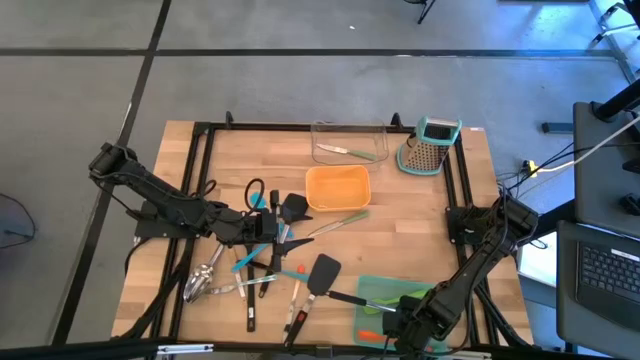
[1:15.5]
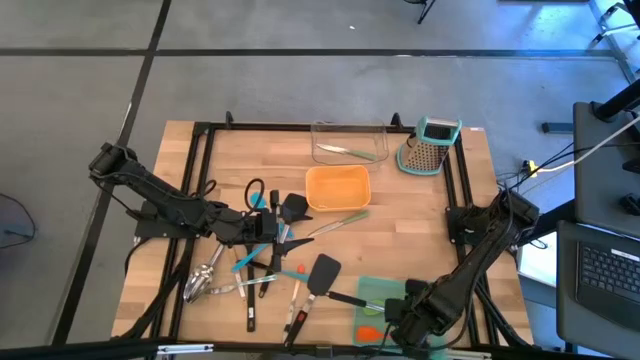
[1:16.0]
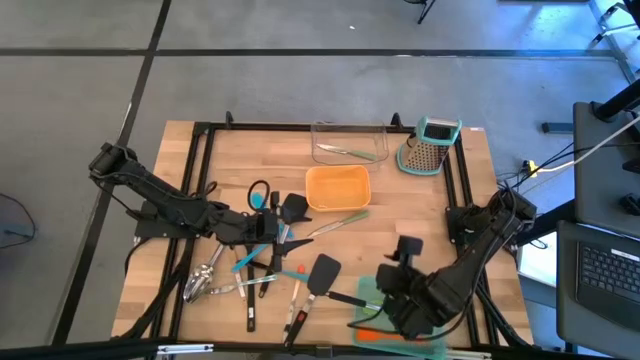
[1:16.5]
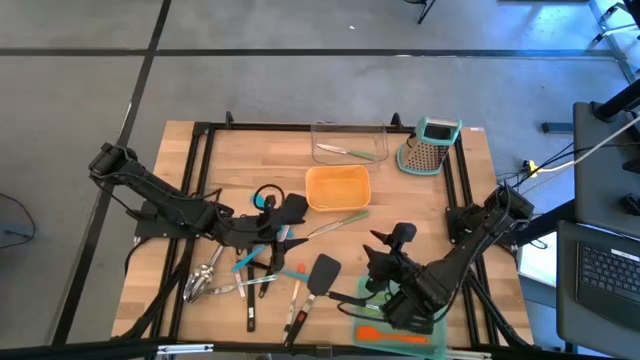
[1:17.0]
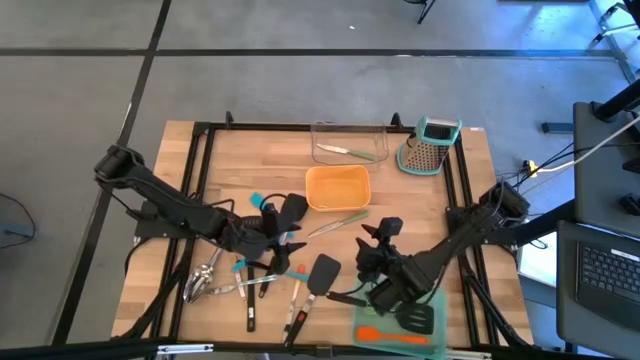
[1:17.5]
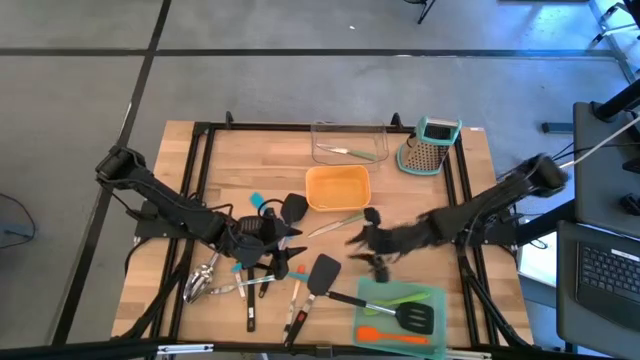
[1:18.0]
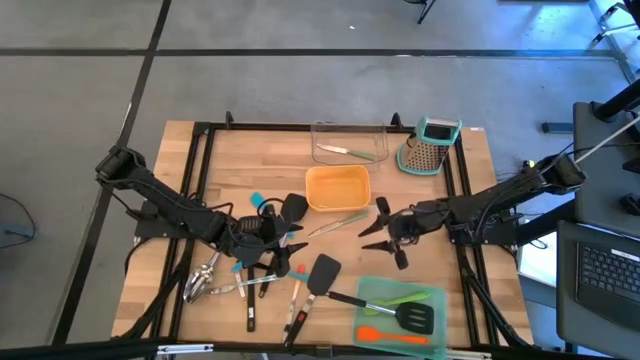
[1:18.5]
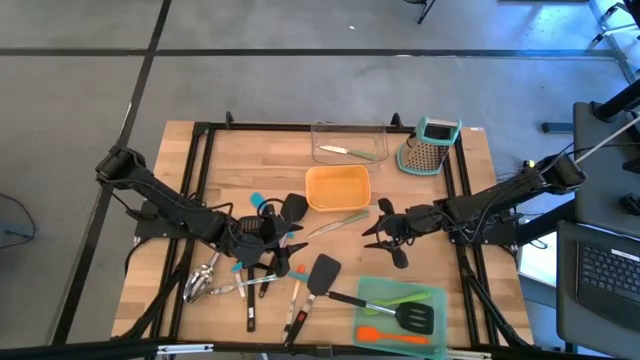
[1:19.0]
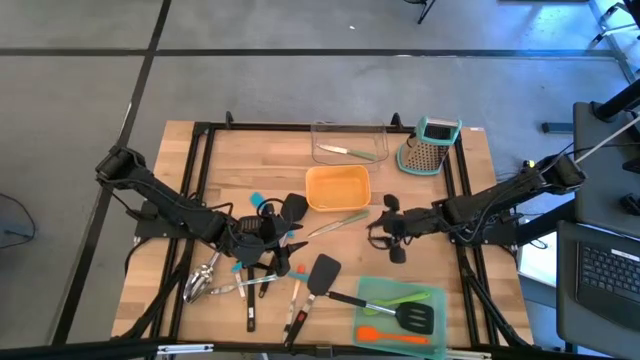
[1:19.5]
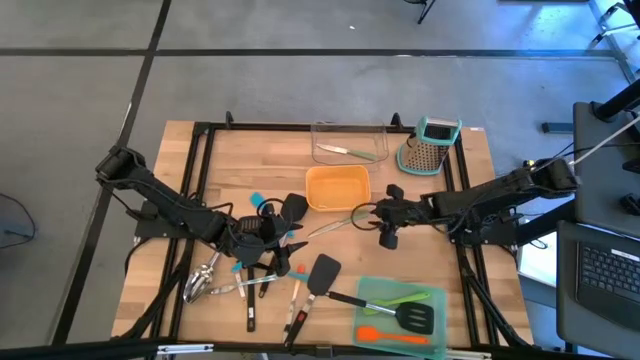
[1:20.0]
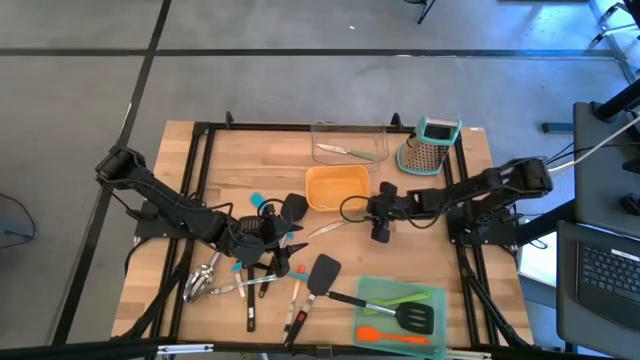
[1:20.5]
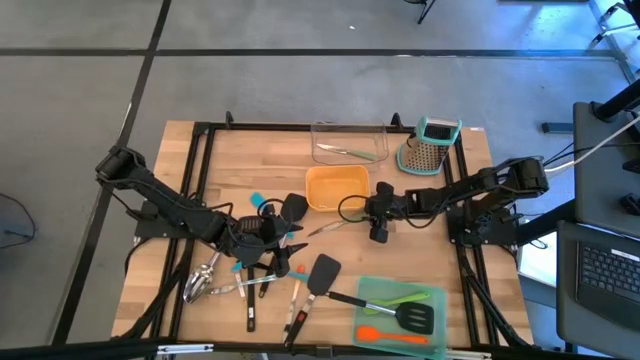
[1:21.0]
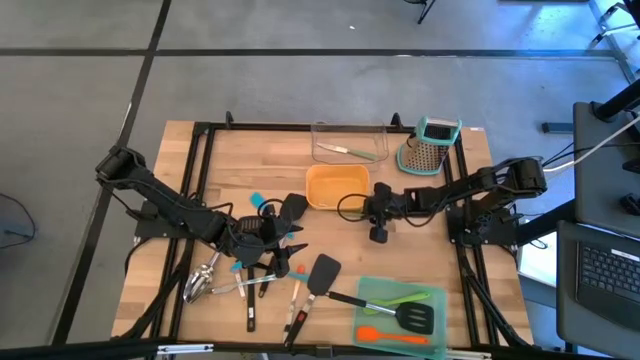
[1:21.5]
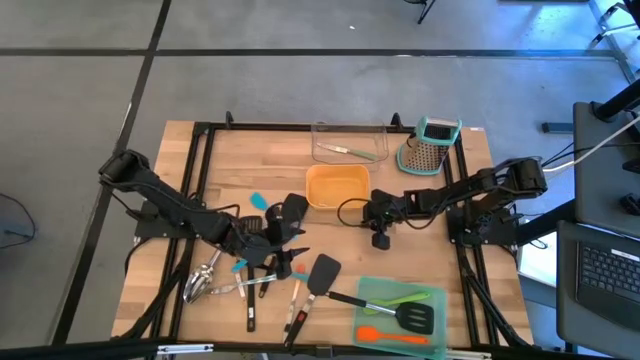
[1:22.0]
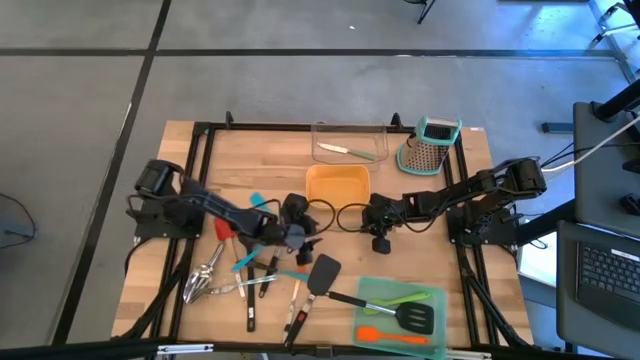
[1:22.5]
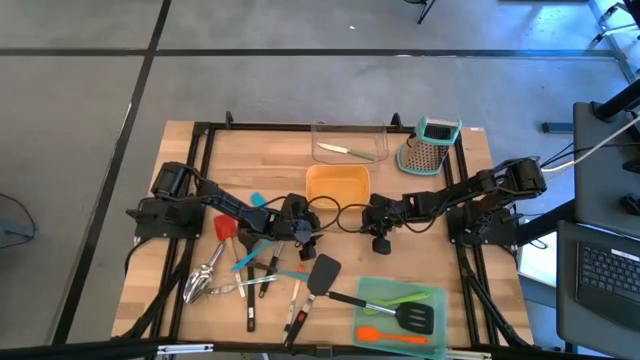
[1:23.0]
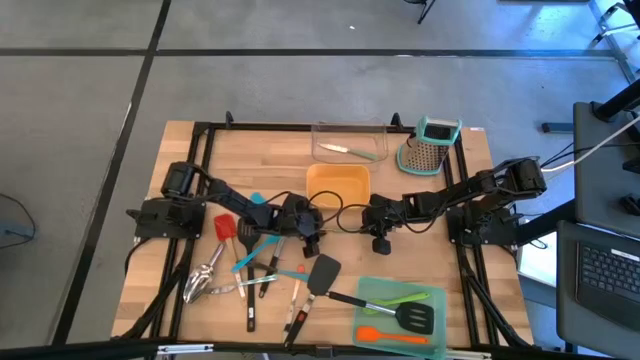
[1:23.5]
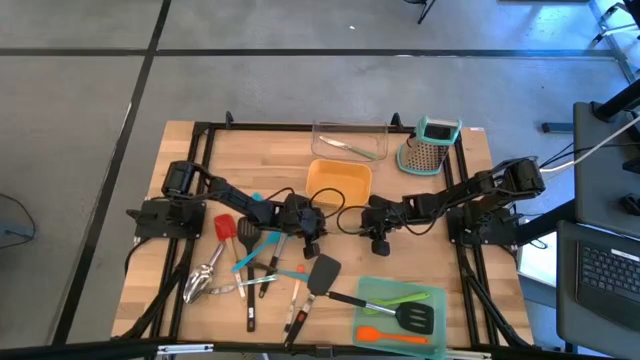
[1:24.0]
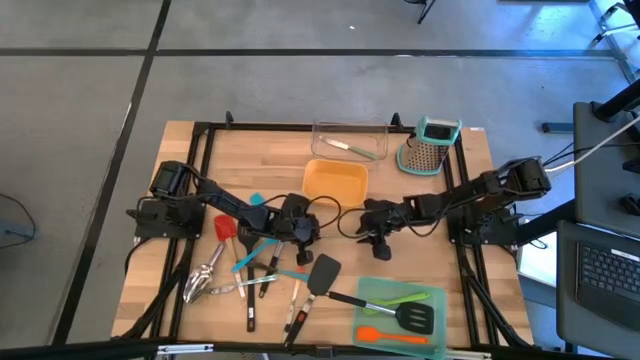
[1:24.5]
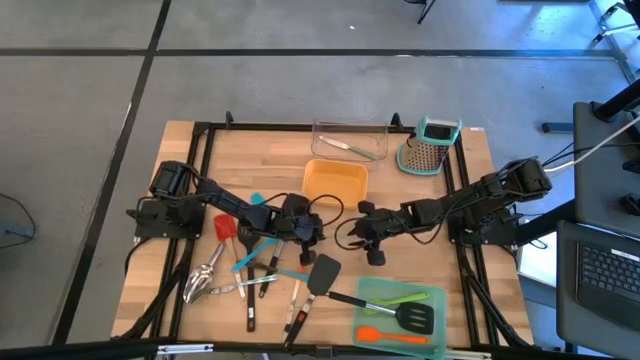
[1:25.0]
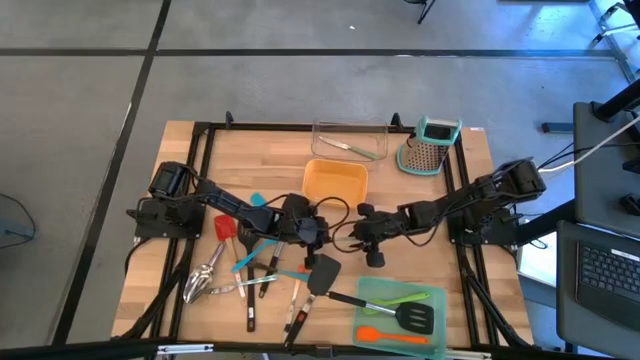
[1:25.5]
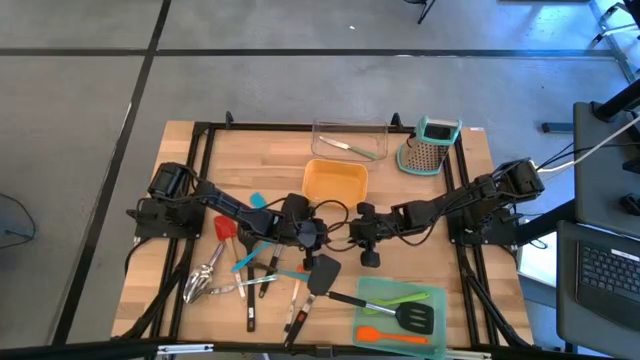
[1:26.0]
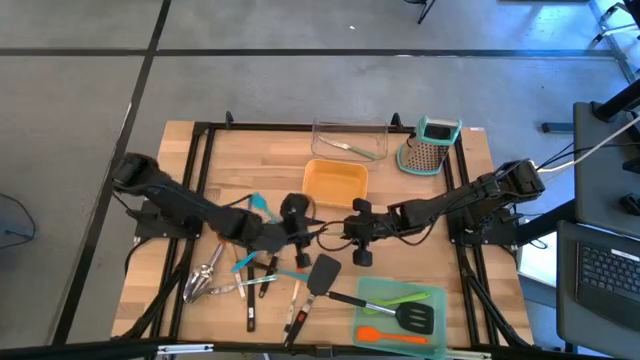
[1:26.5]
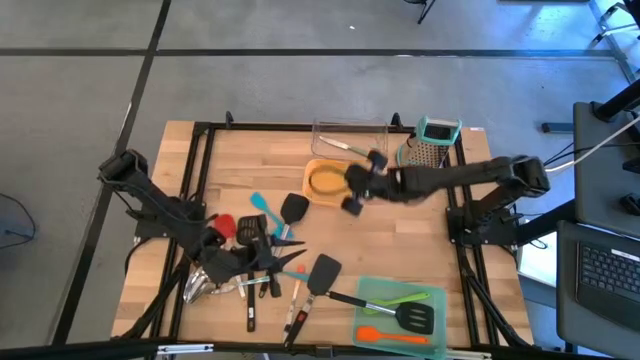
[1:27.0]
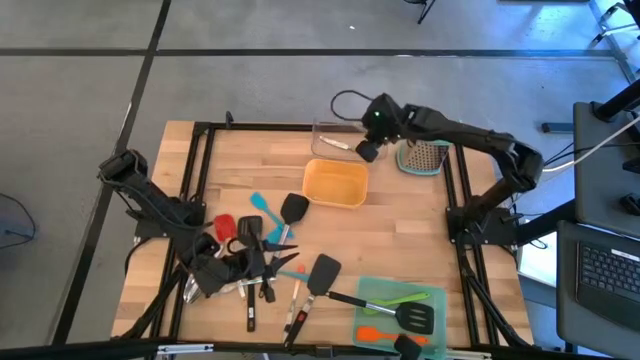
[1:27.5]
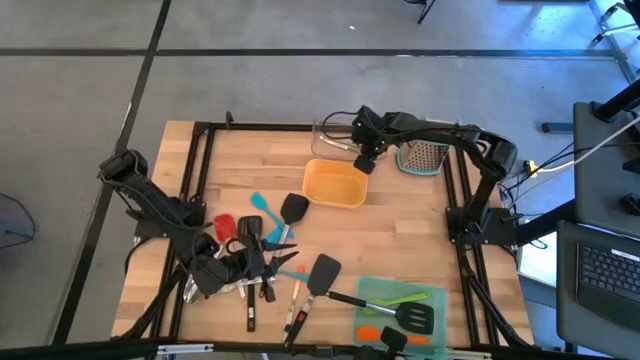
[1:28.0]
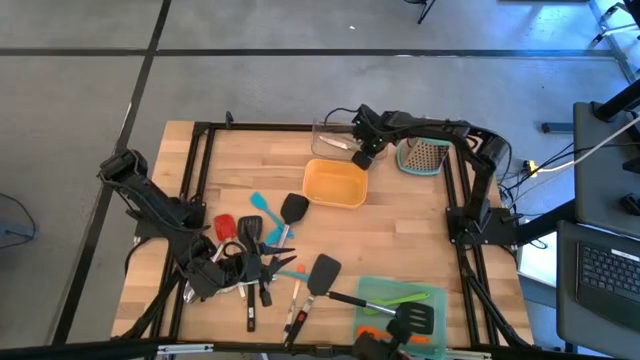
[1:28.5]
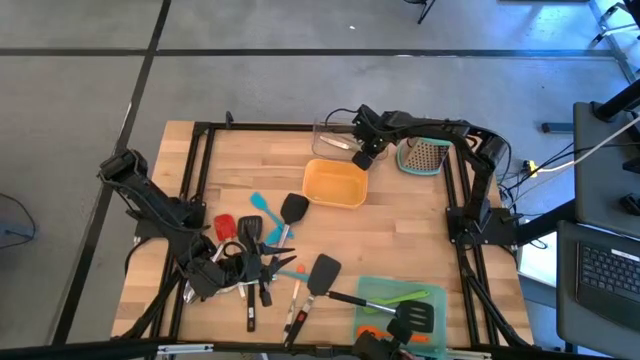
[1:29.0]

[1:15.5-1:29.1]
Task: Pick & Place Kitchen Items
Put the green knife into the transparent bin

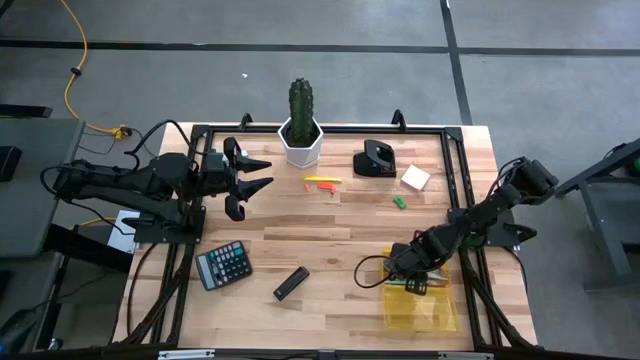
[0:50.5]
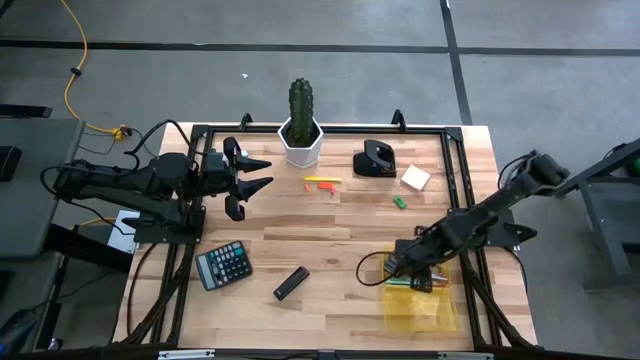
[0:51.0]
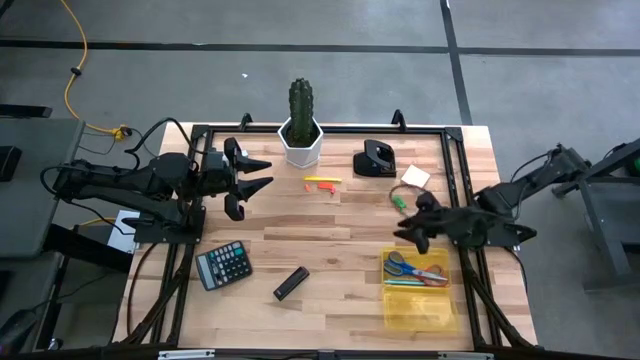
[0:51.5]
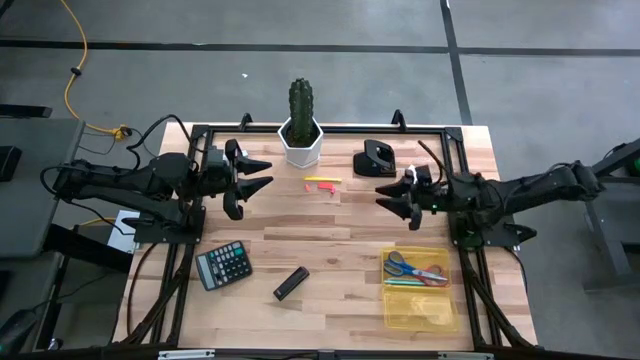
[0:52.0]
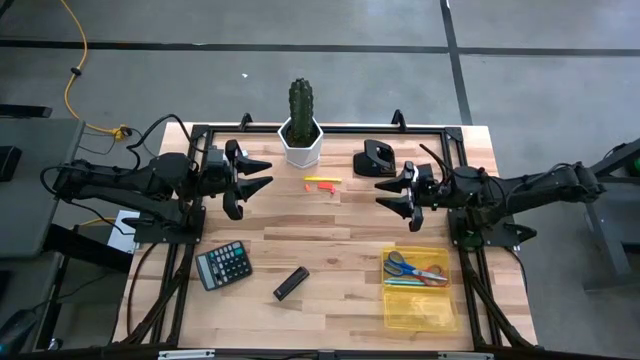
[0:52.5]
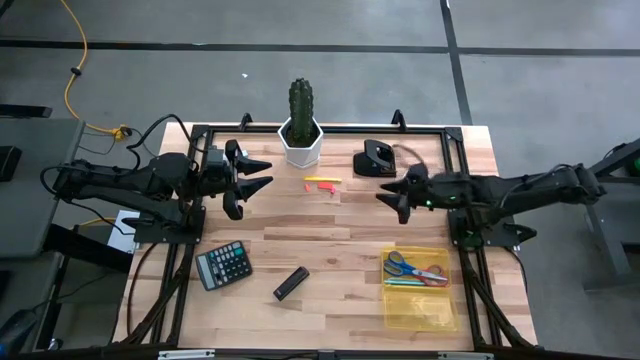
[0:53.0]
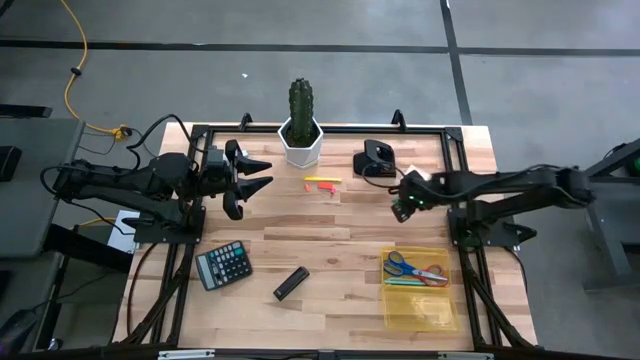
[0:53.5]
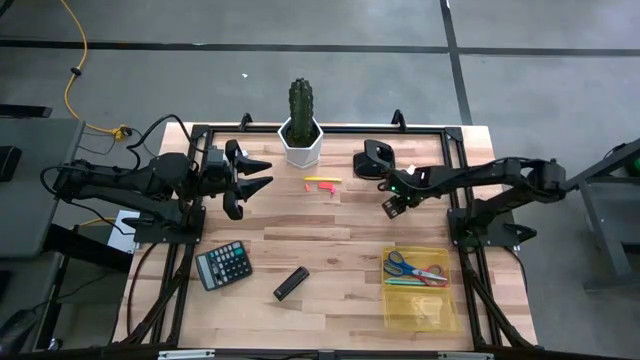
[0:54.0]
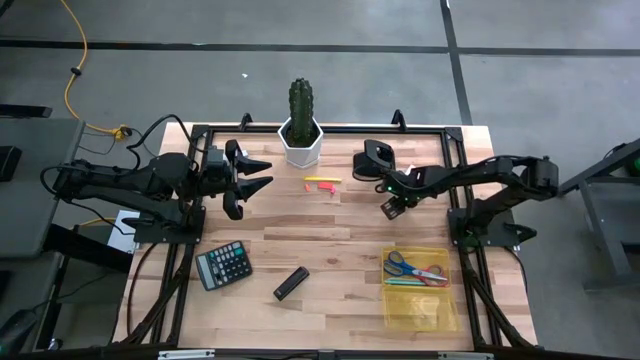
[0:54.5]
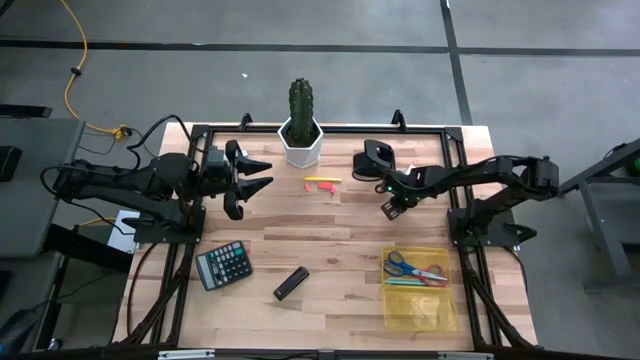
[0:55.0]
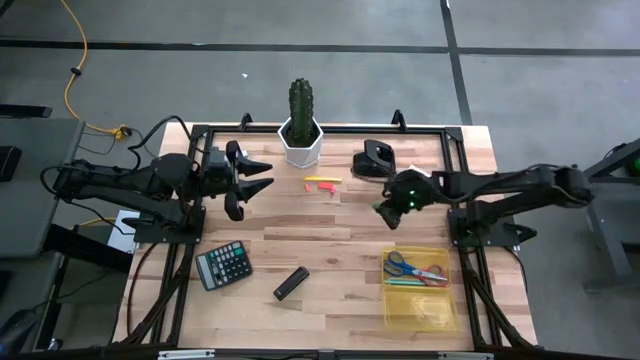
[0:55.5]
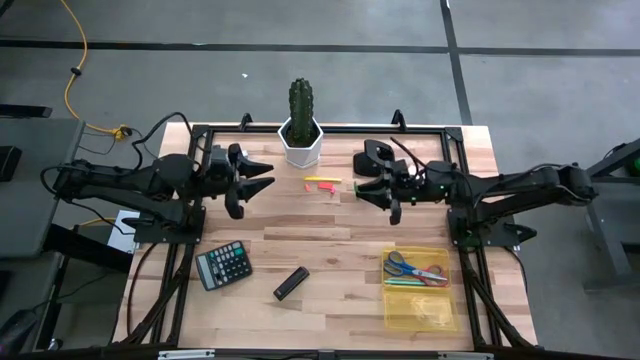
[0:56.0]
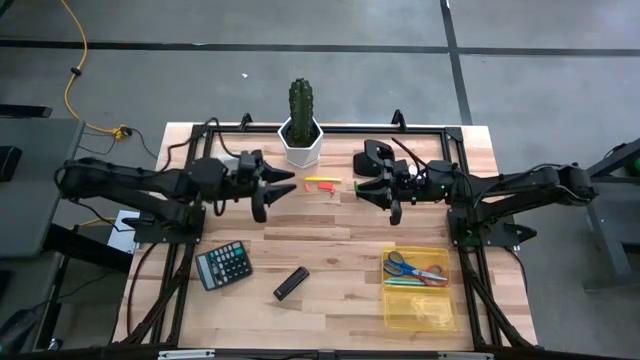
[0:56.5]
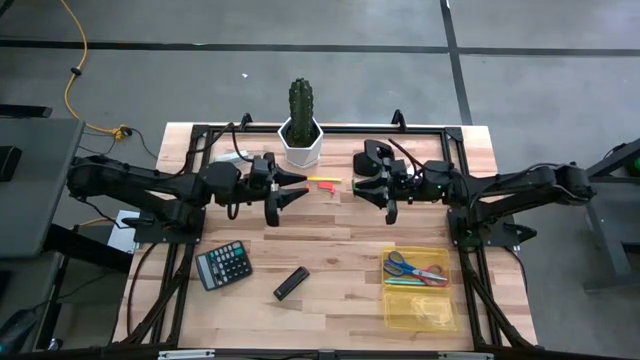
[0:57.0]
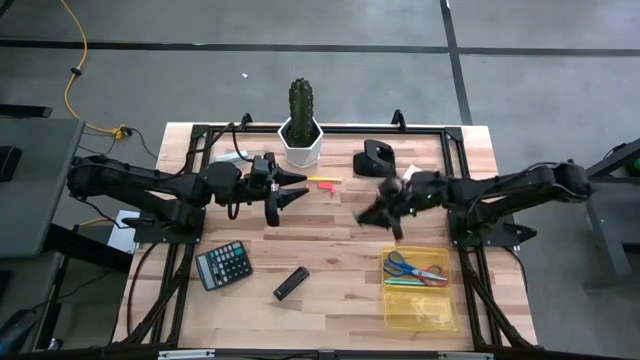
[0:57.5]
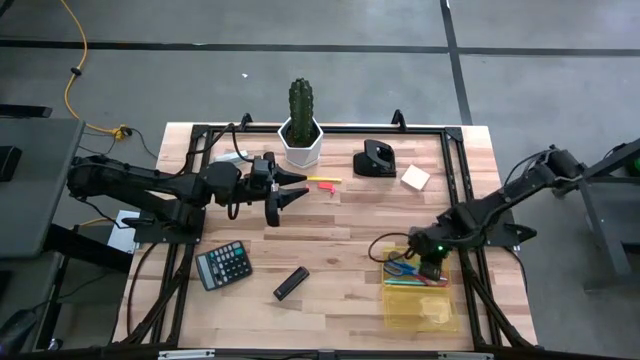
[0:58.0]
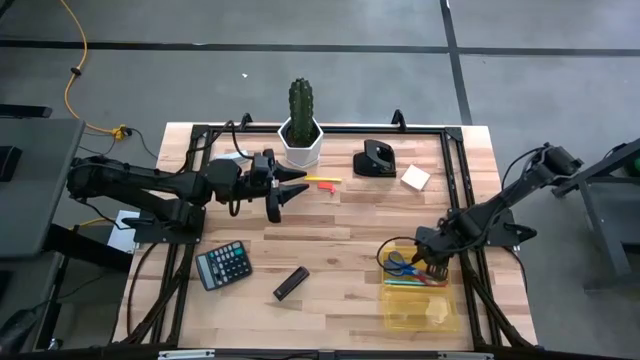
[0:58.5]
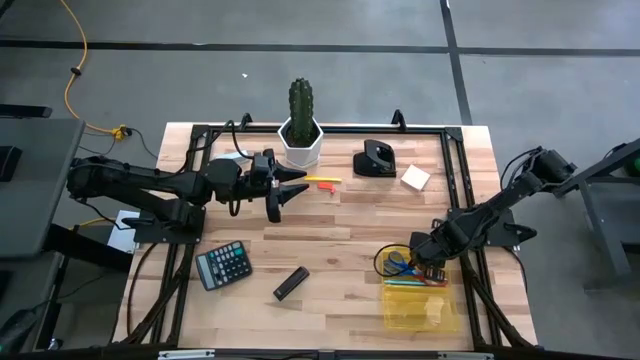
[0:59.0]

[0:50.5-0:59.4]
Task: Pack school essentials
Put the large green eraser on the yellow supply box
